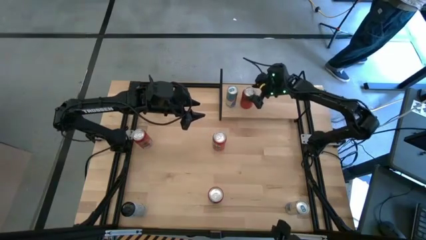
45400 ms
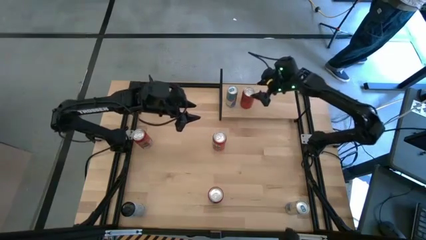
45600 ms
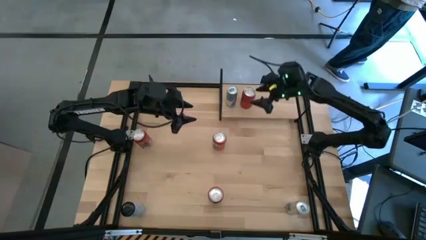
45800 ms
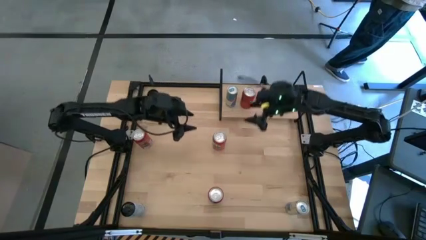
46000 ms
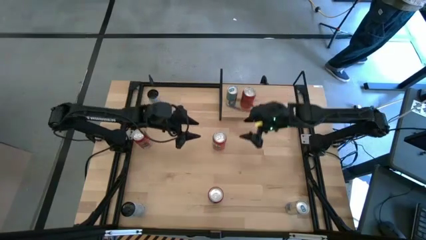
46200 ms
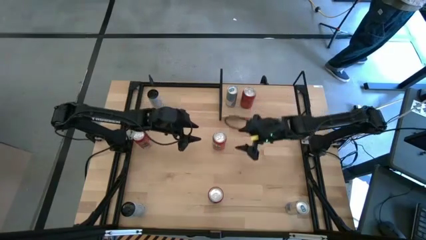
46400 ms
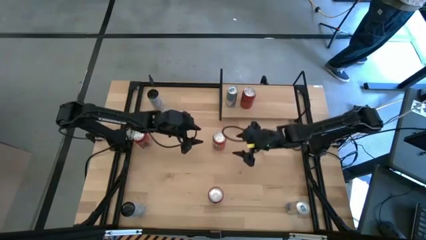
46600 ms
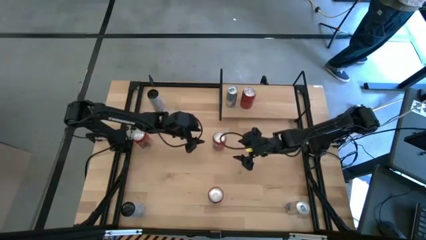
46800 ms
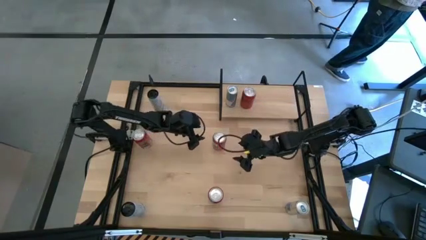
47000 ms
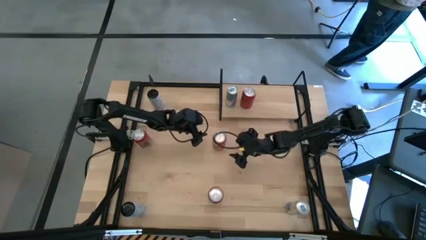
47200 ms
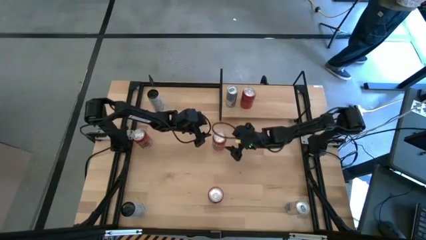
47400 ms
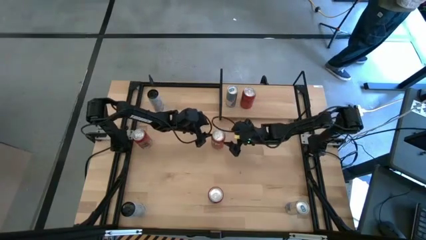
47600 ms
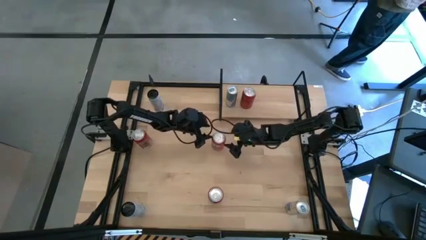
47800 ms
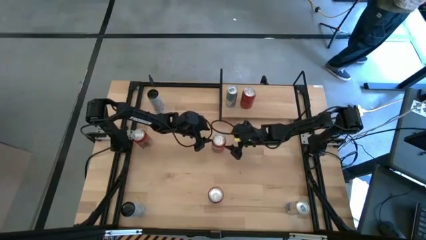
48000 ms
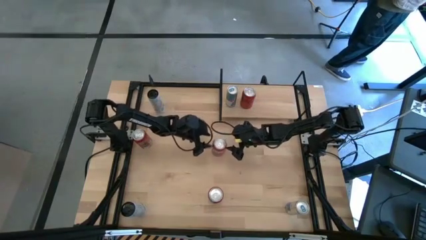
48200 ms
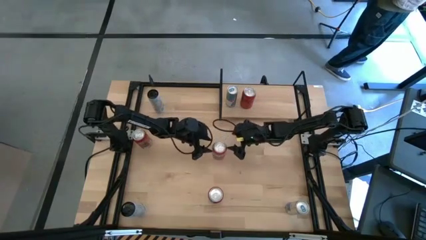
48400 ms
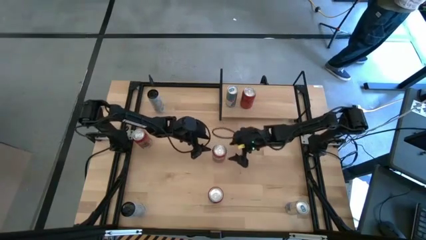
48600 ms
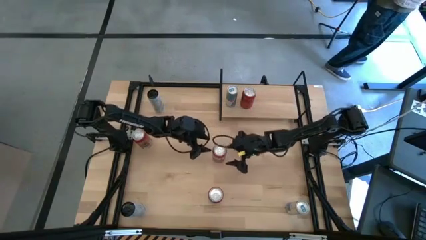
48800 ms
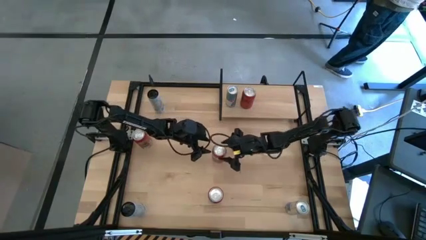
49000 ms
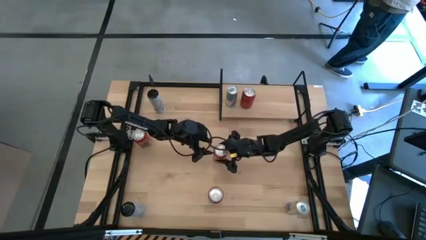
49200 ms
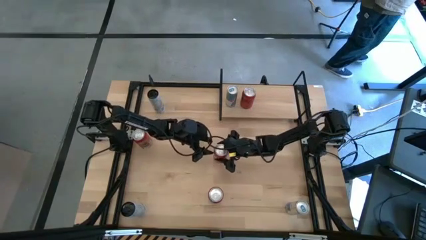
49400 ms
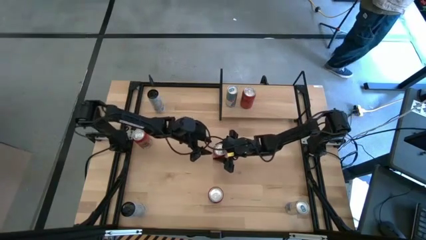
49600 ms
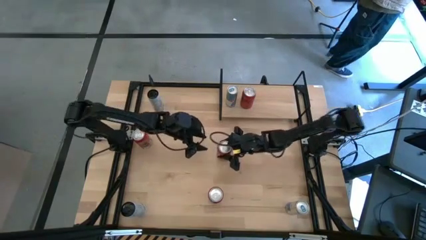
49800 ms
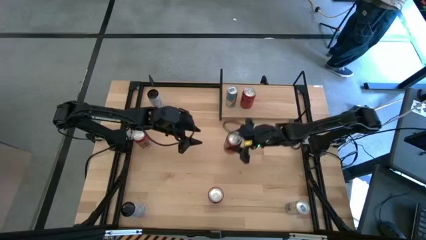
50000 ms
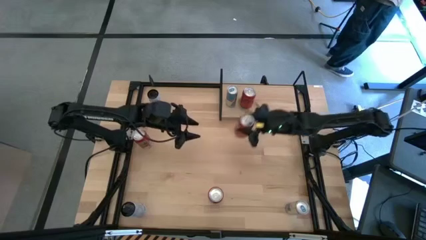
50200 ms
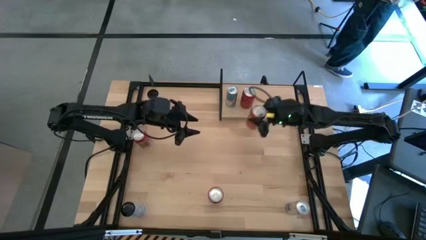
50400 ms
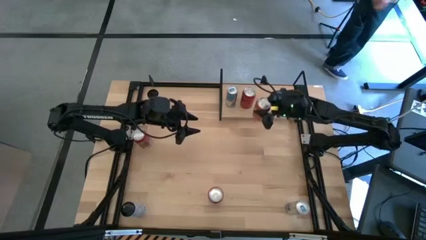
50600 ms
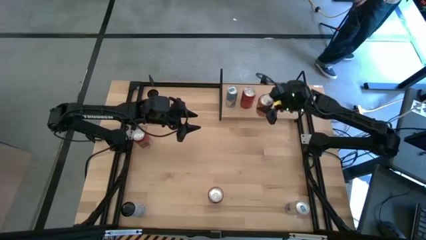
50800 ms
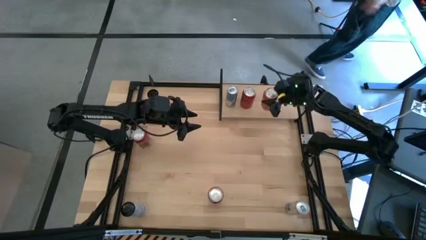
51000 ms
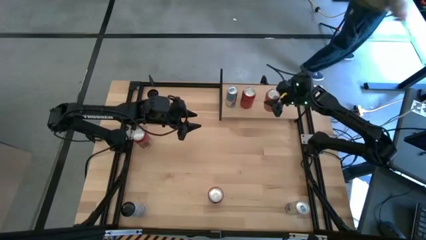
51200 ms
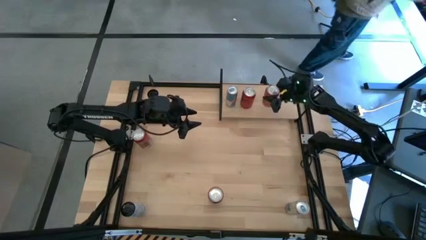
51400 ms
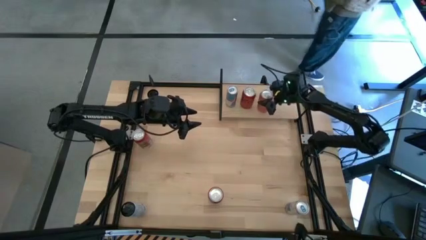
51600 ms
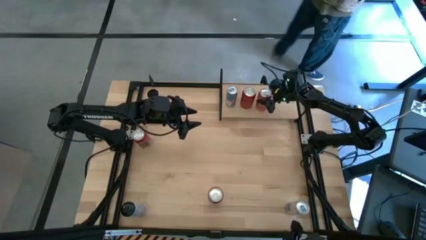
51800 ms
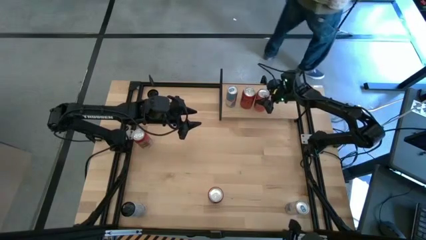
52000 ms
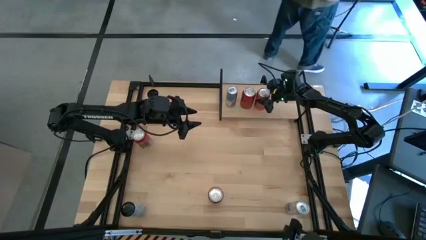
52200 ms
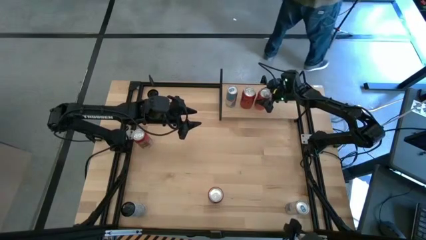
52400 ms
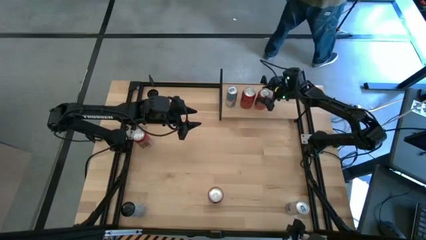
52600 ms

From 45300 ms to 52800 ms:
Task: Place canned beverage on shelf
Put the top red soda can on the shelf

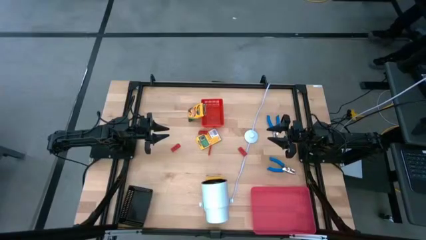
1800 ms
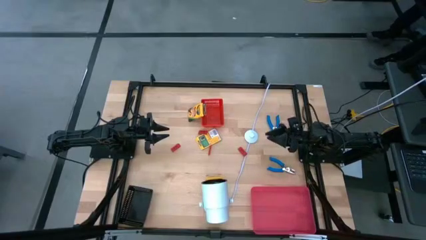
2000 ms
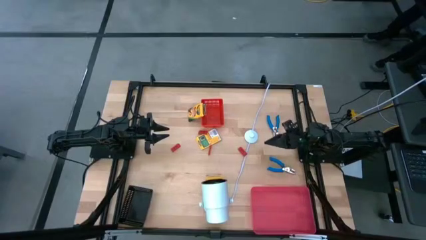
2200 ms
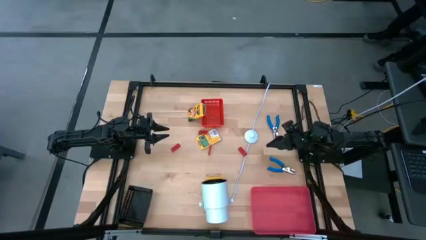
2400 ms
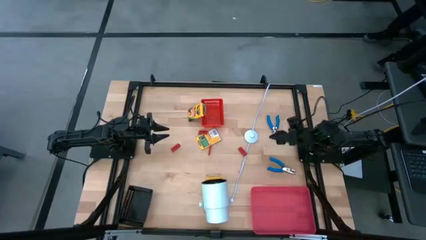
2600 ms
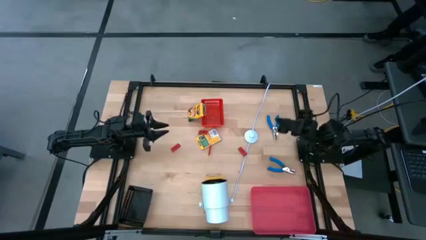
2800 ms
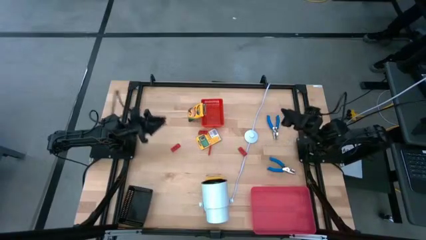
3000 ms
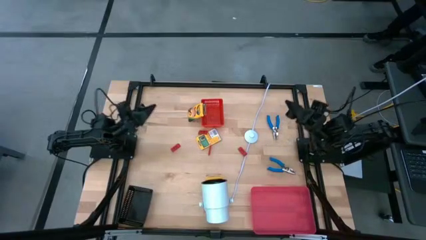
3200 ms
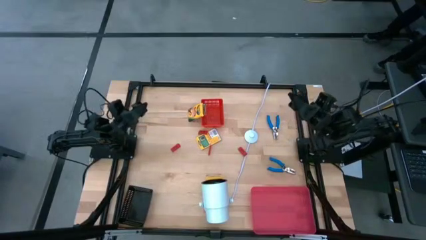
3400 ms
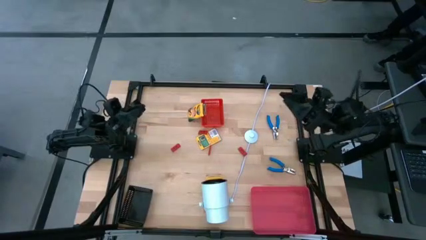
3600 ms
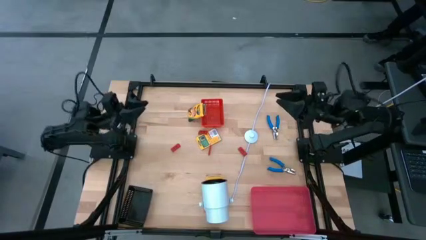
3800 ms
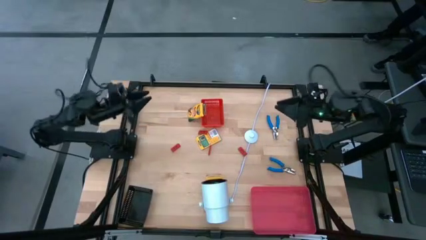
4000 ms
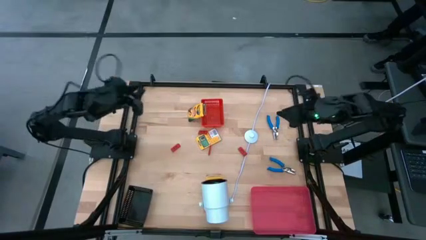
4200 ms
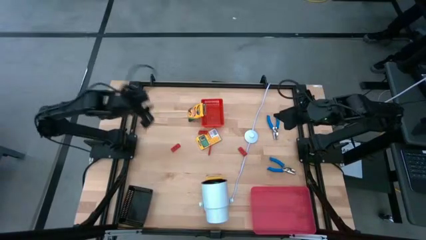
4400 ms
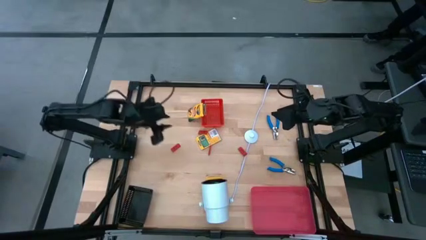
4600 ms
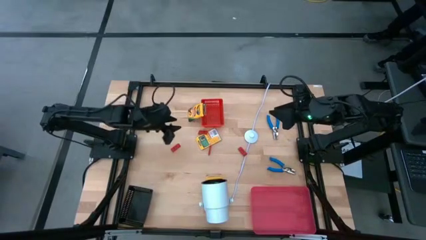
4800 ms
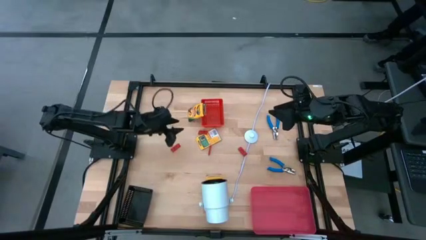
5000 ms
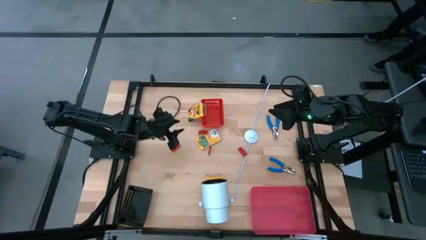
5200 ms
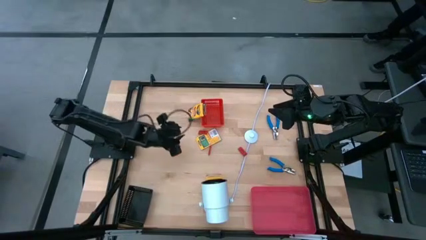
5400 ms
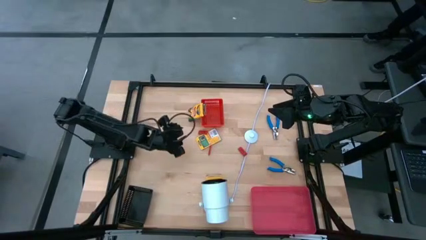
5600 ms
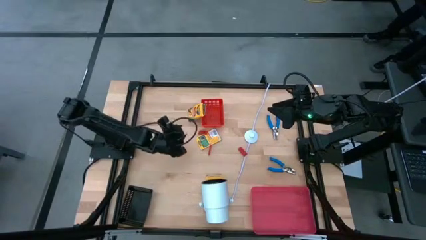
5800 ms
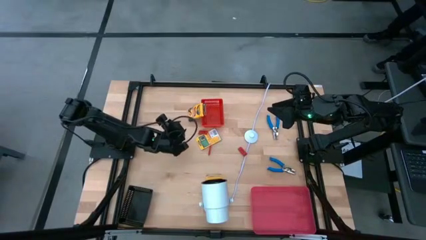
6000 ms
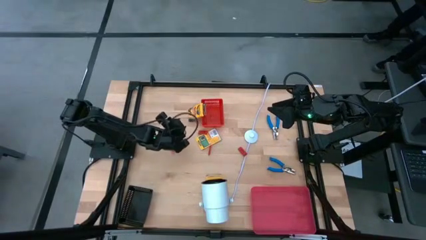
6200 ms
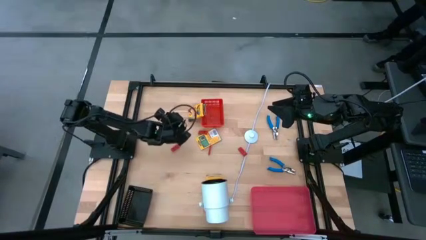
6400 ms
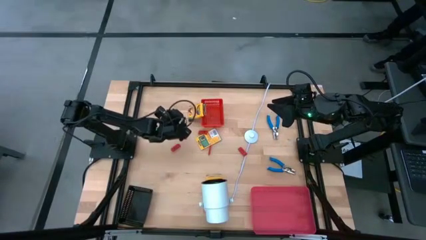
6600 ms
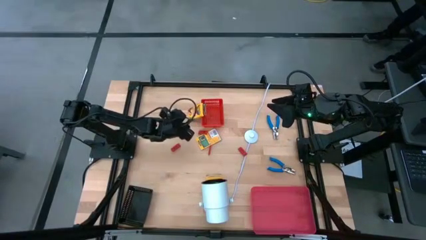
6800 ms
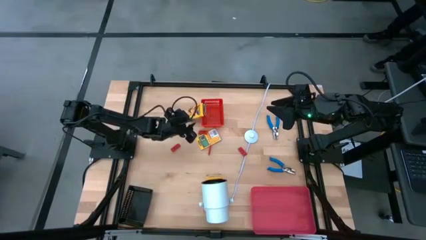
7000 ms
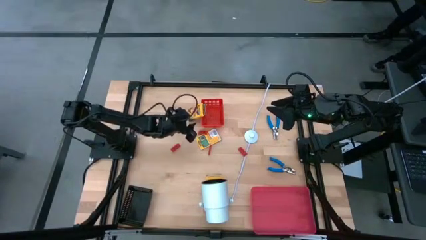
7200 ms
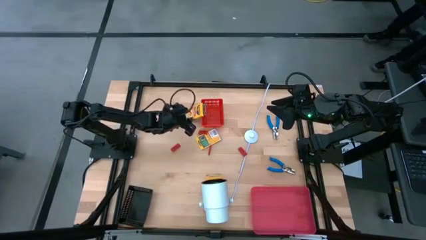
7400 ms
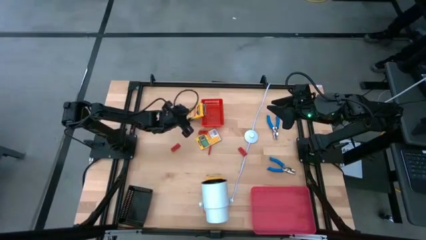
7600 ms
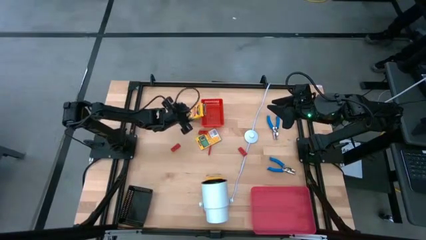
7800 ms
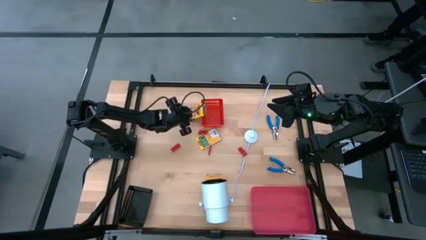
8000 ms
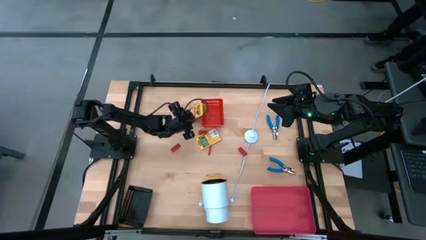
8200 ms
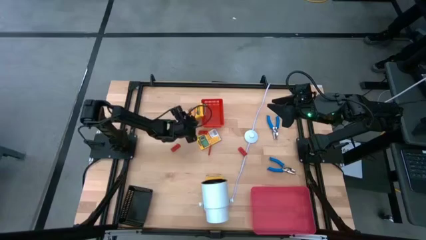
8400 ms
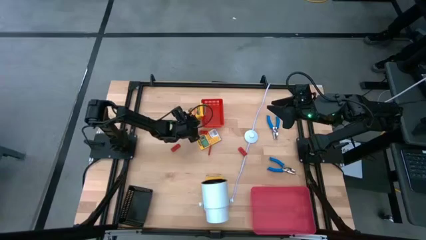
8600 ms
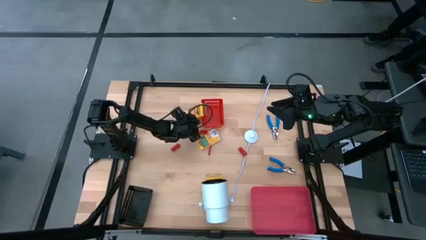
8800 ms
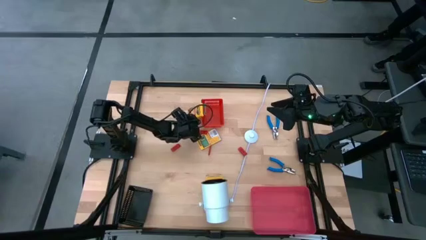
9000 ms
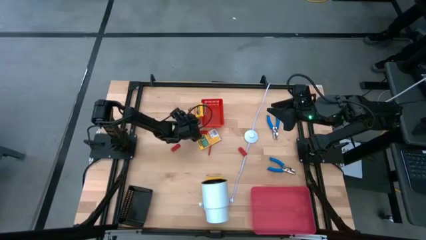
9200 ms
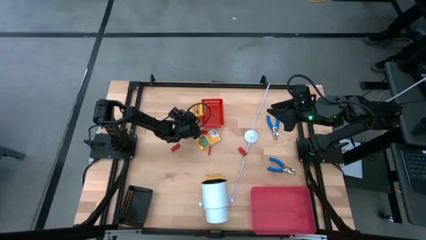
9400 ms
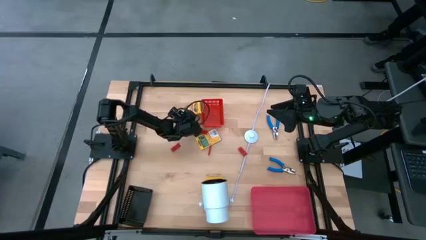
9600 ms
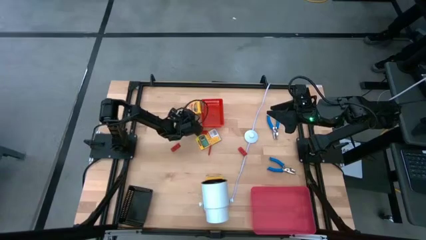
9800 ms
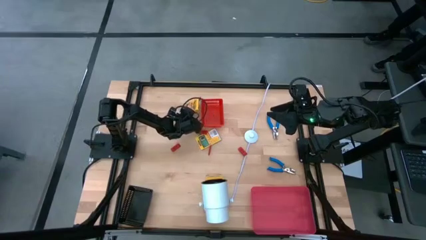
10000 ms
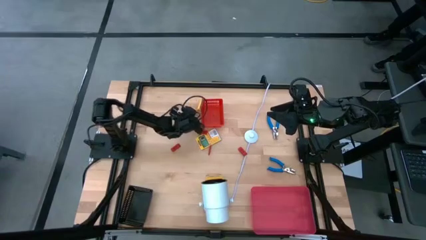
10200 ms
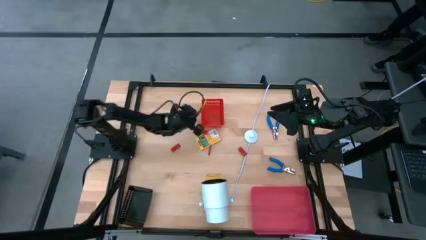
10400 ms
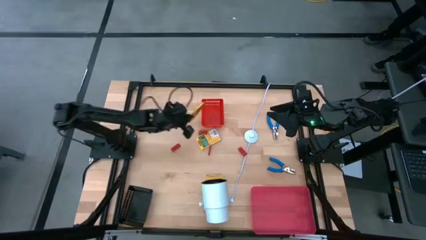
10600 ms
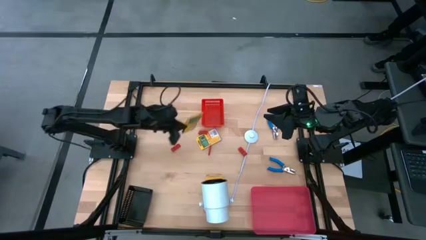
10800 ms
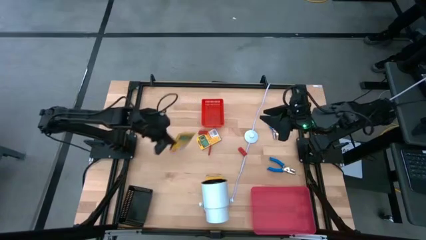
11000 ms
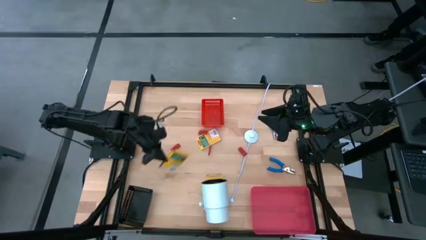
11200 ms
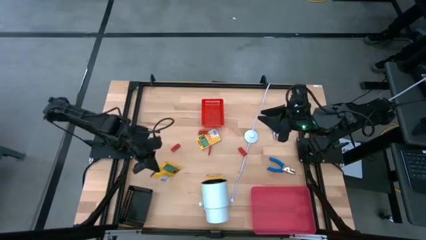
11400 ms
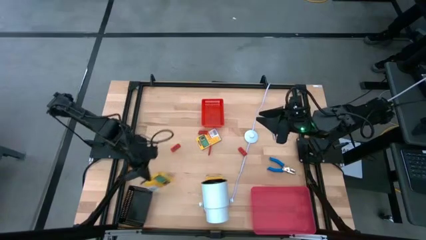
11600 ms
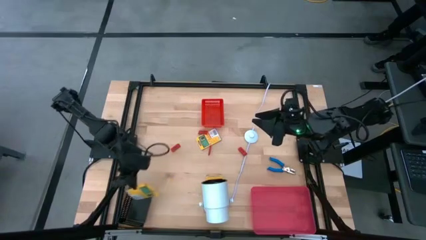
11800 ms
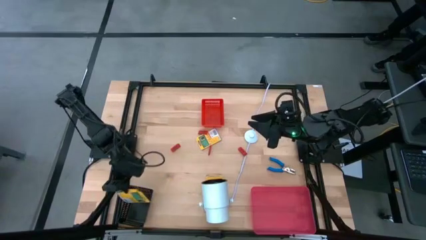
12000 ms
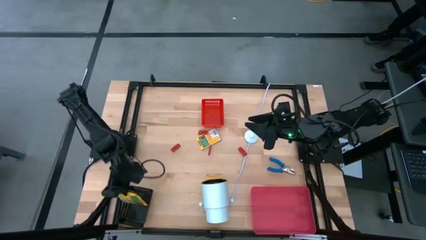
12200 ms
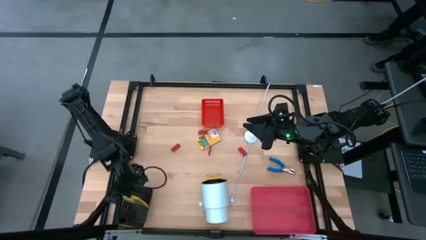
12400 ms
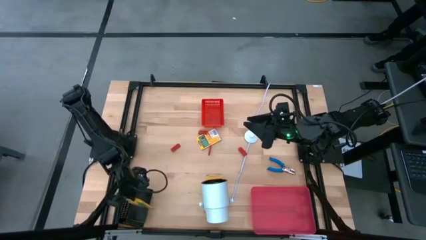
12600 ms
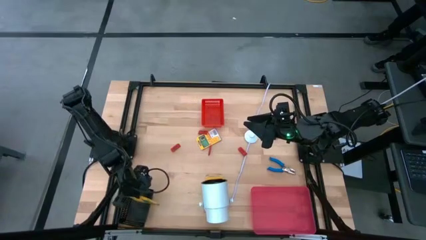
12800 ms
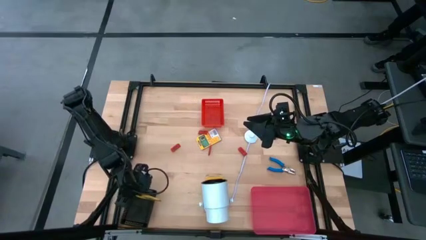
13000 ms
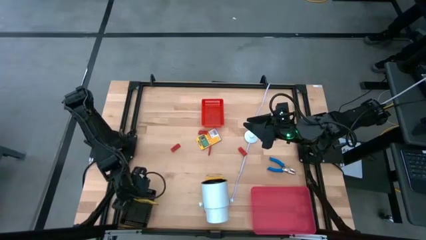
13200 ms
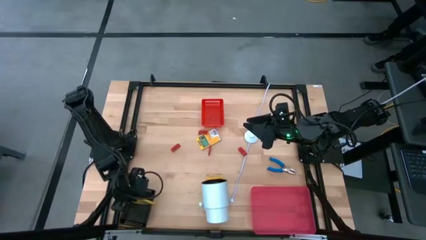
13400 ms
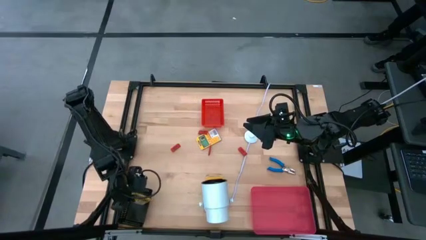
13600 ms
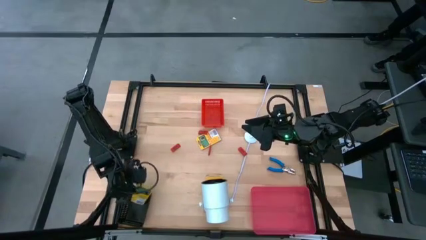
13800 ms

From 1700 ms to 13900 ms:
Task: Pick & Place School Supplies
Put the yellow box crayon into the black bin
